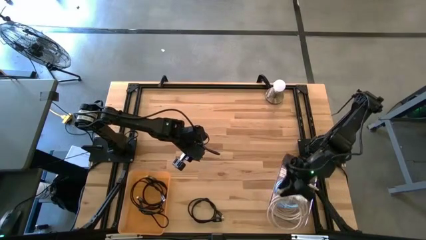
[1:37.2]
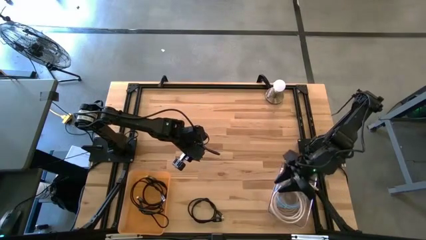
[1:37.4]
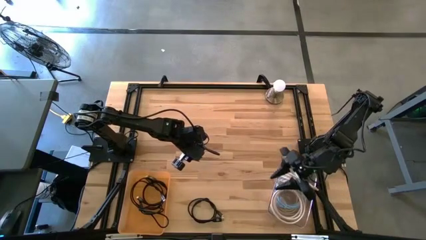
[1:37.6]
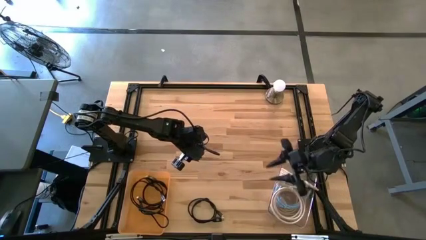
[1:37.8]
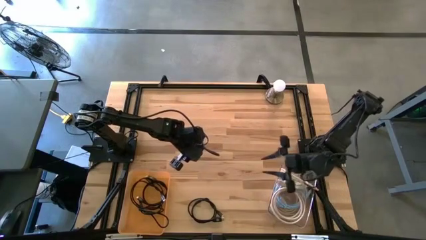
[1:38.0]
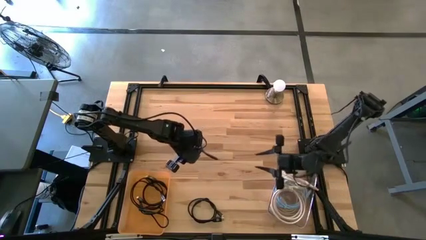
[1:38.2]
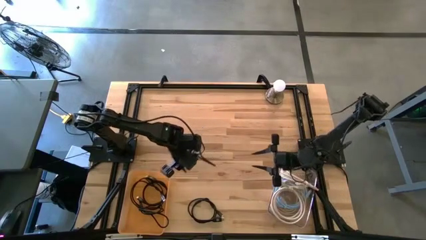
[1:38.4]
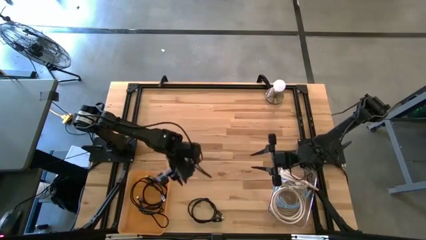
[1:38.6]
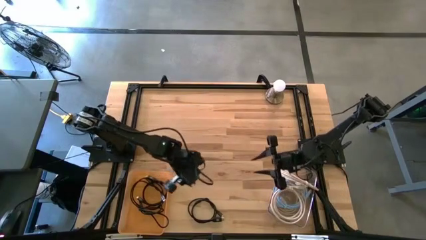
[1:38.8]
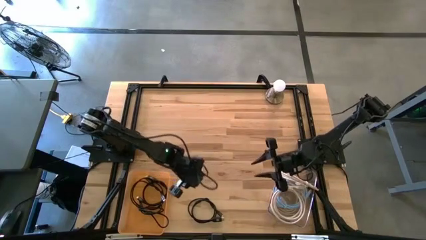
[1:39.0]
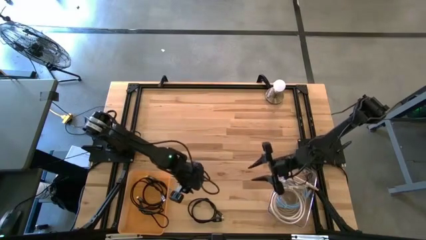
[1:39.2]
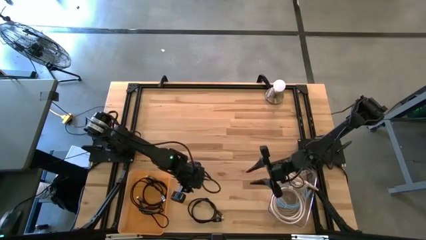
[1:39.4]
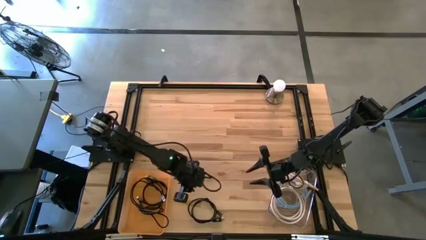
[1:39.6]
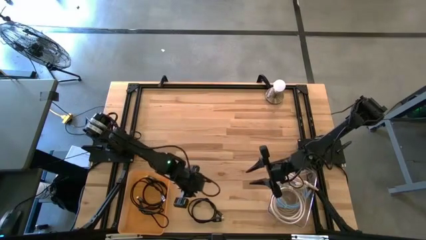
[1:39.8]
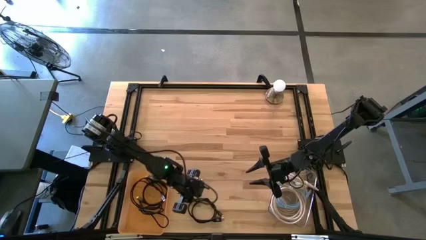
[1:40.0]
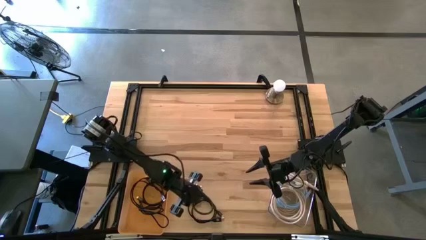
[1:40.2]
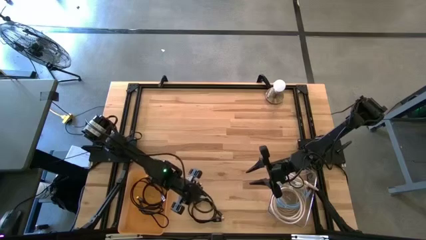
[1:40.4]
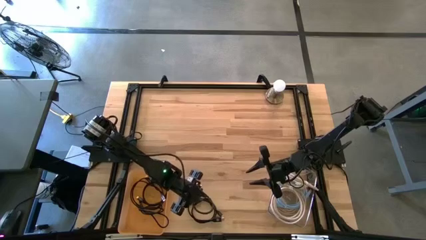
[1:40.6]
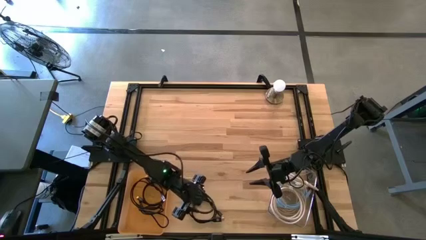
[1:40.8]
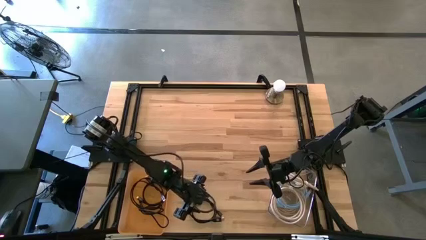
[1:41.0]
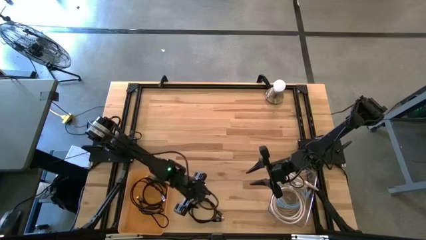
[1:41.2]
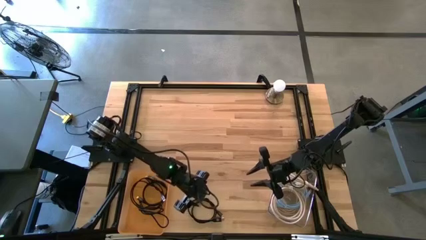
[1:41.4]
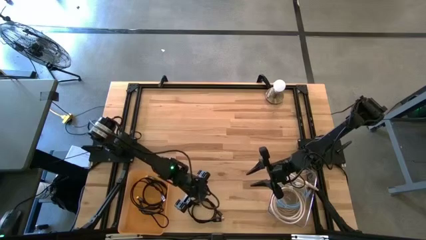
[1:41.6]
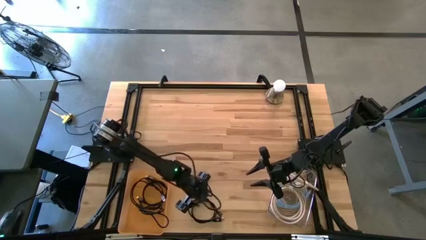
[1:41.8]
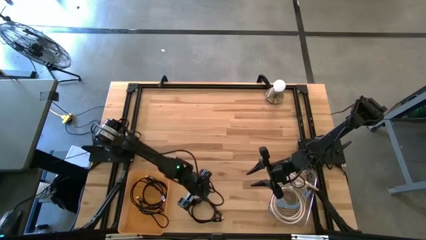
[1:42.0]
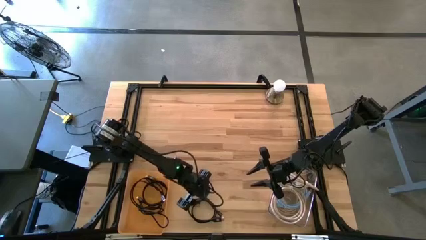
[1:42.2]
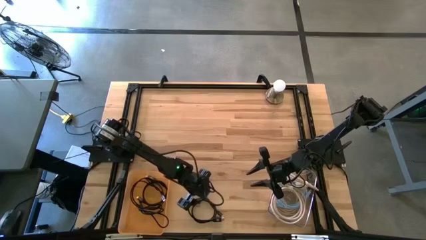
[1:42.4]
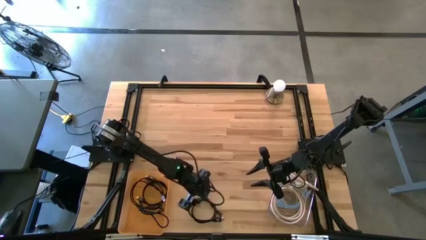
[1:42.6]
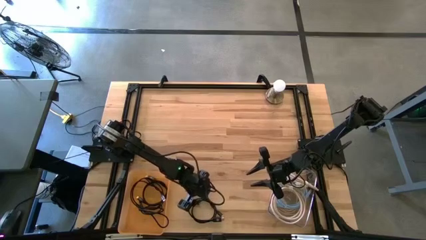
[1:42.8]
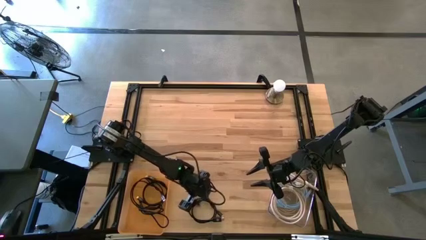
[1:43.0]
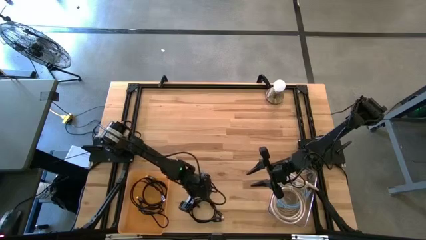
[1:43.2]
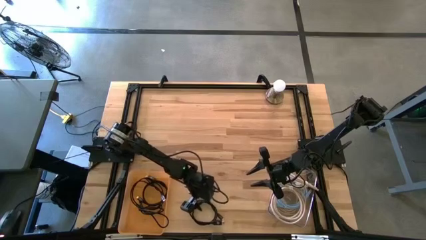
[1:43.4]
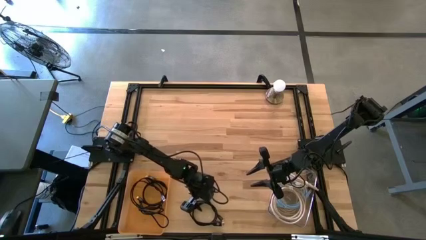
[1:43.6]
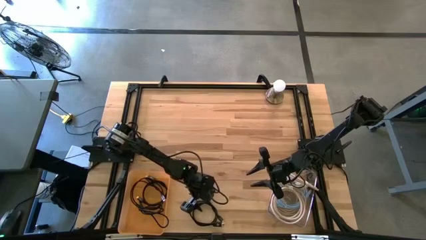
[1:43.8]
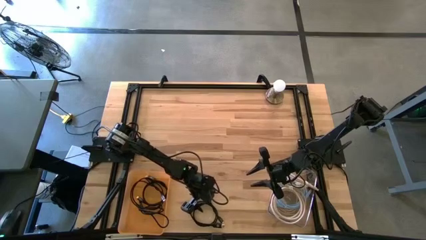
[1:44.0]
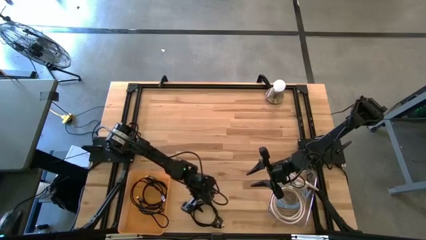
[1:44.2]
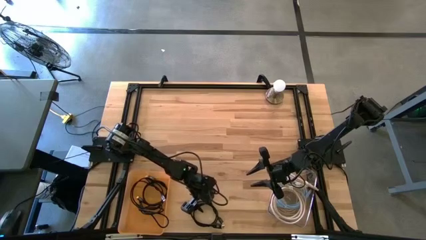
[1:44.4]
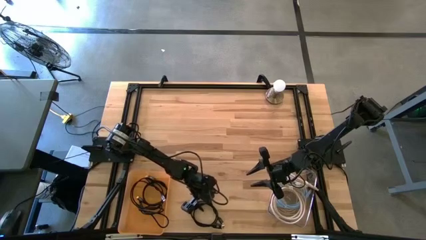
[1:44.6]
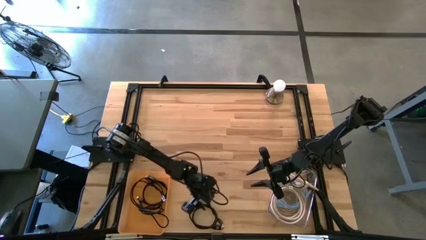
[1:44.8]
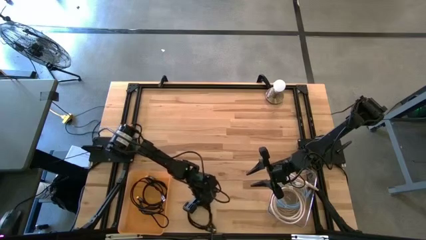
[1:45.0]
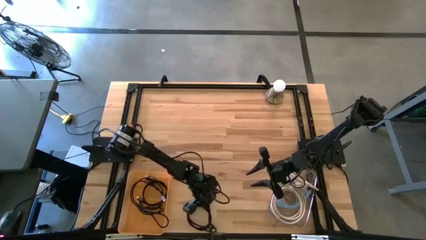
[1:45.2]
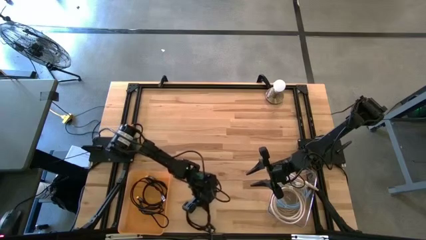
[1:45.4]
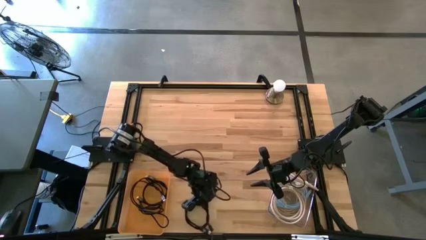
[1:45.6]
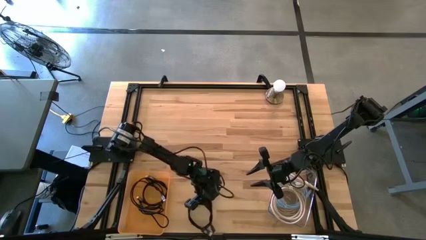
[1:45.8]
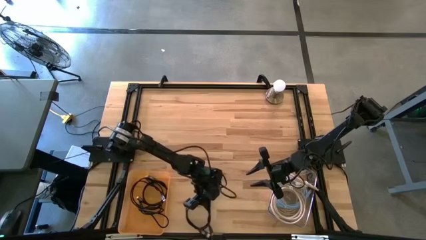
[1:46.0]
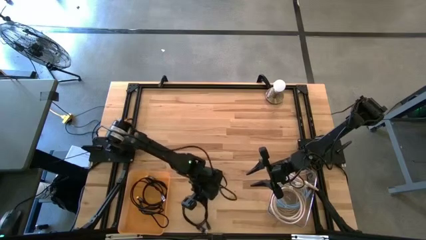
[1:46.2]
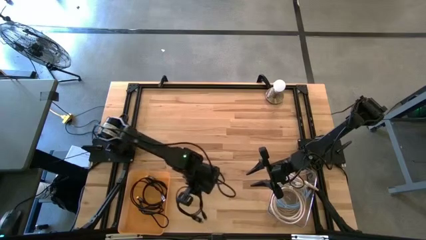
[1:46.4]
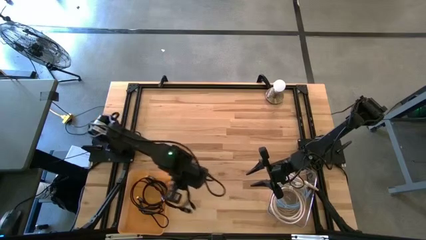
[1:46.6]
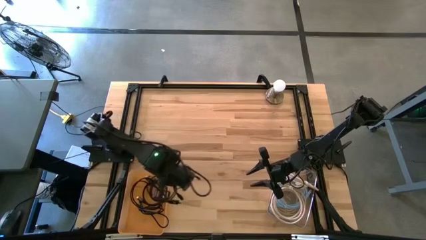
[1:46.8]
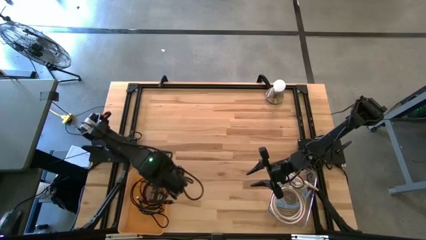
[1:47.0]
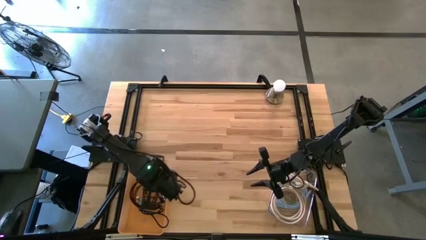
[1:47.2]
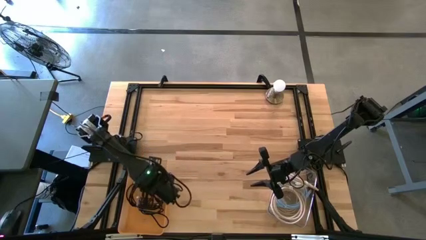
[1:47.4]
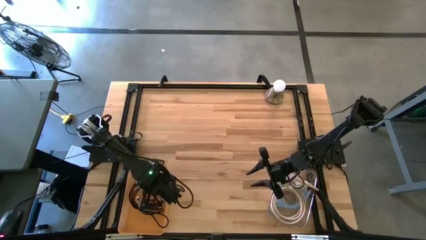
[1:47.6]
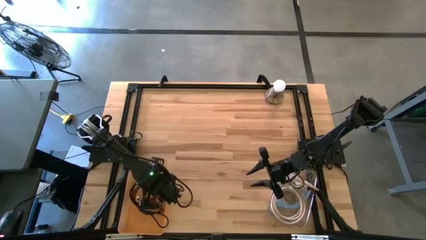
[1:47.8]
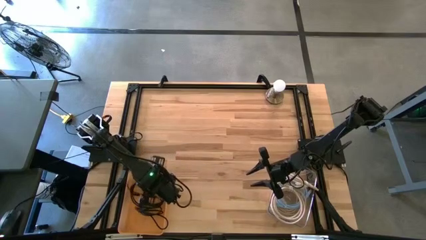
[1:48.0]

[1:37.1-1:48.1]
Task: Sort HDMI cables
Put the black HDMI cable into the orange bin

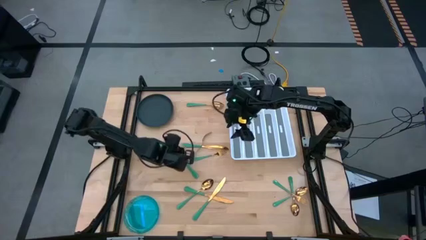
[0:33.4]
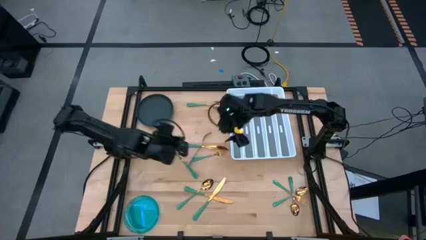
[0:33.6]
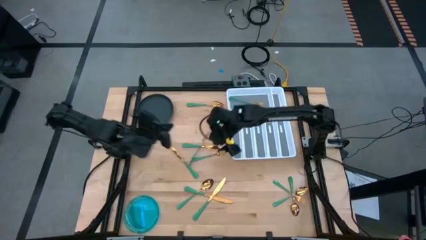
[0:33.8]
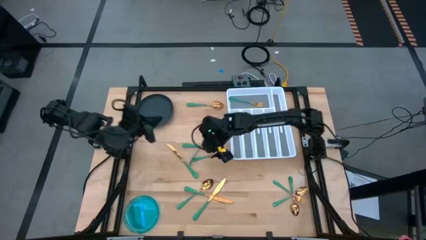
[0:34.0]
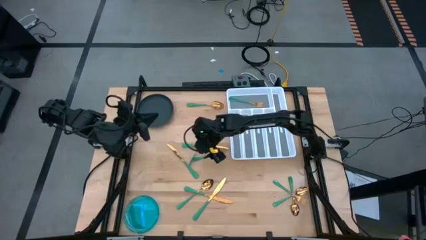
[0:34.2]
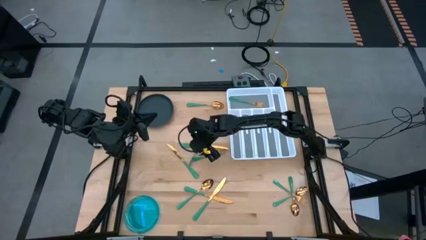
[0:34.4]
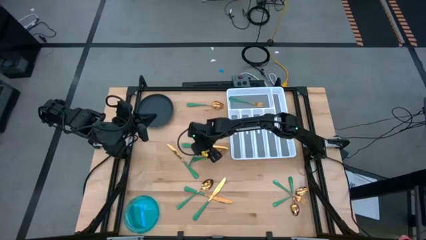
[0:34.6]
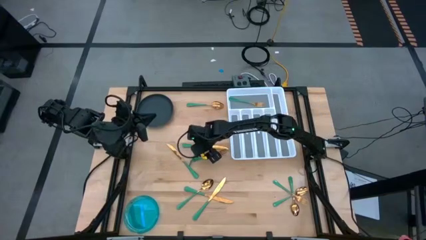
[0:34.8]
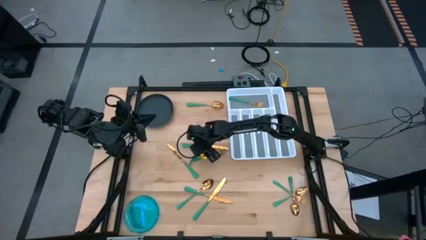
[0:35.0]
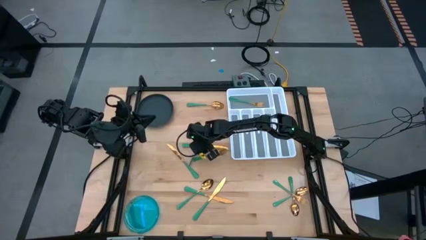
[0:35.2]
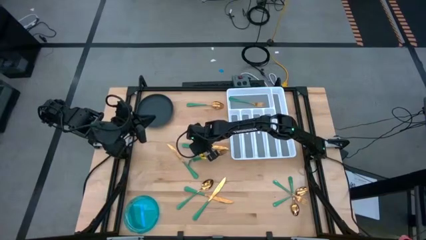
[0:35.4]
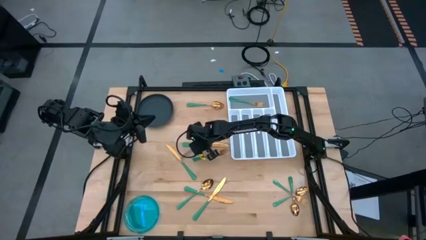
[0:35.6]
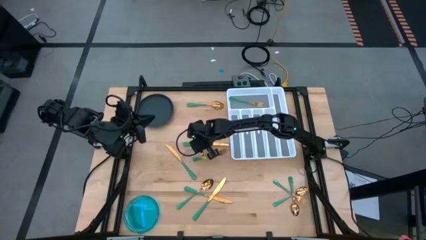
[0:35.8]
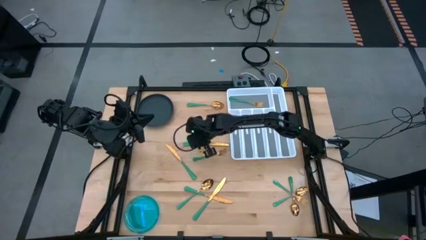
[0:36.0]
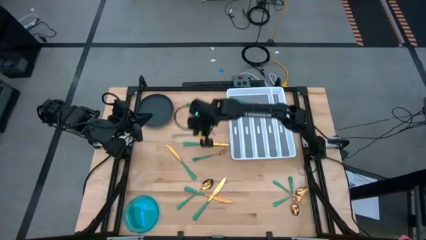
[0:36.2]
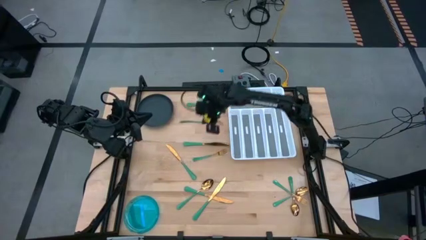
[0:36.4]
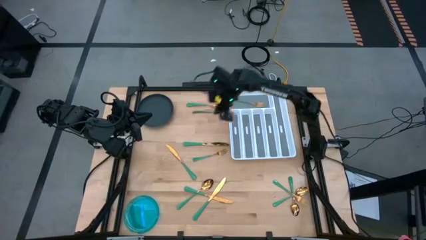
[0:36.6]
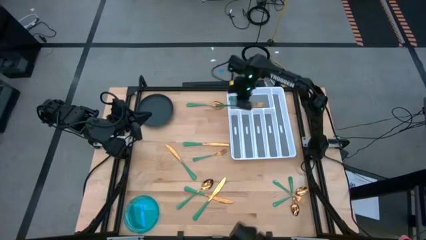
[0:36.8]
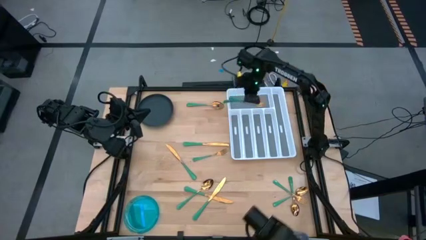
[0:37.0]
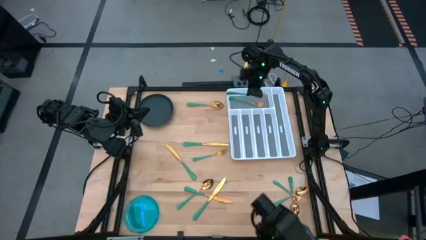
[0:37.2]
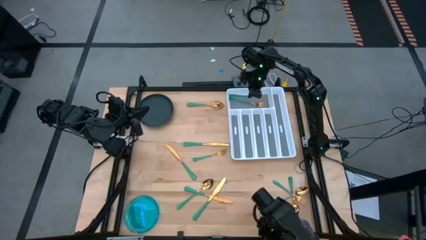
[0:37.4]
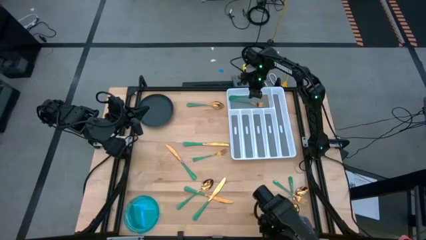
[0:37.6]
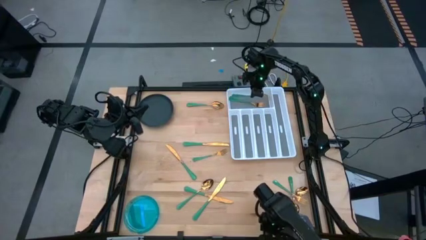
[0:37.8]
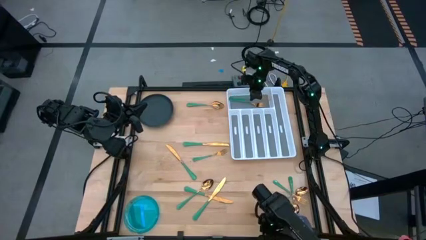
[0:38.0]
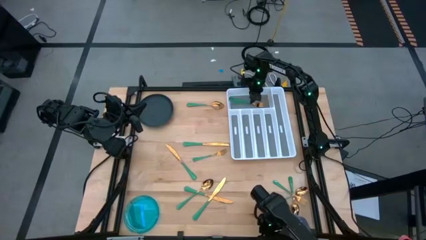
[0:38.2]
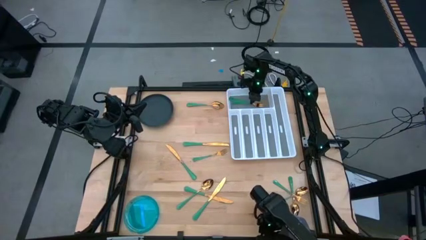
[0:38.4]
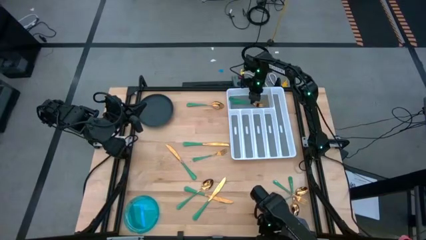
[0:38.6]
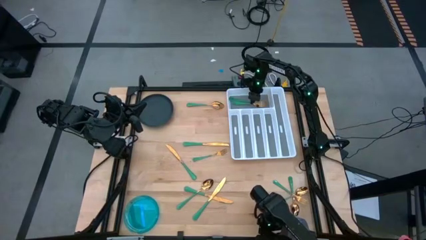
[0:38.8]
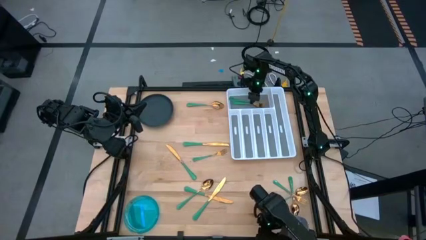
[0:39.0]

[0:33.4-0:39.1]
Task: Sort silverware
Put the green fork into the silverware tray
